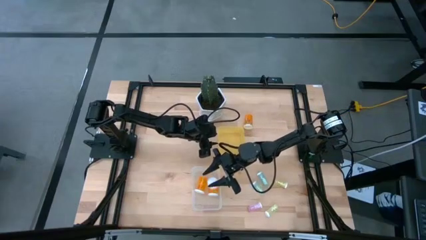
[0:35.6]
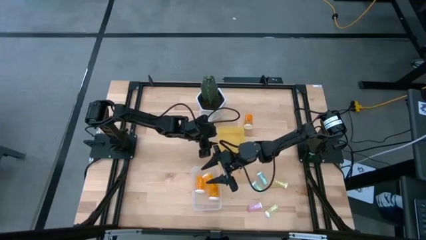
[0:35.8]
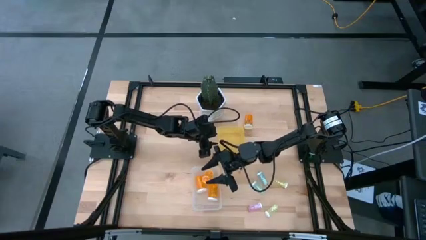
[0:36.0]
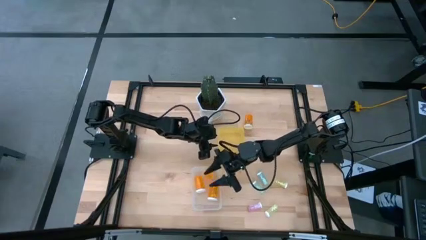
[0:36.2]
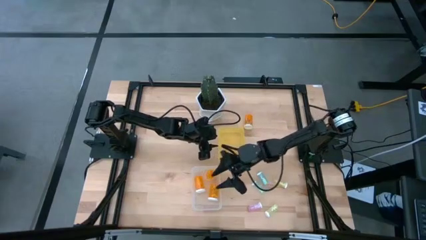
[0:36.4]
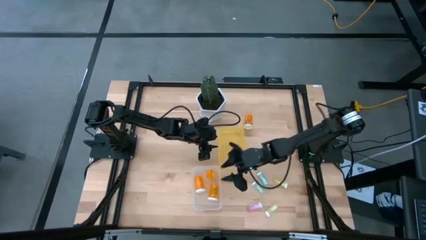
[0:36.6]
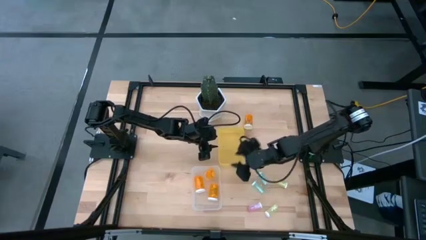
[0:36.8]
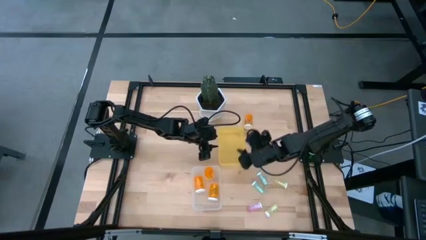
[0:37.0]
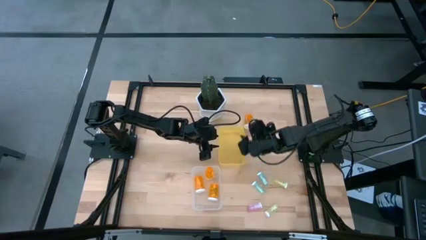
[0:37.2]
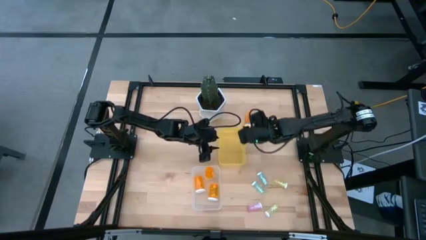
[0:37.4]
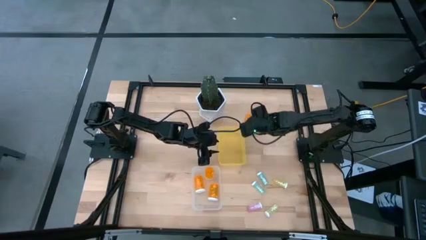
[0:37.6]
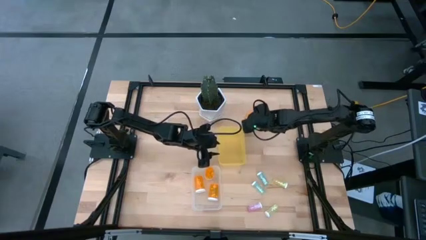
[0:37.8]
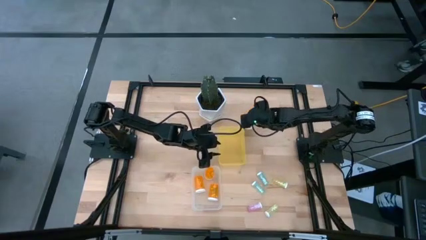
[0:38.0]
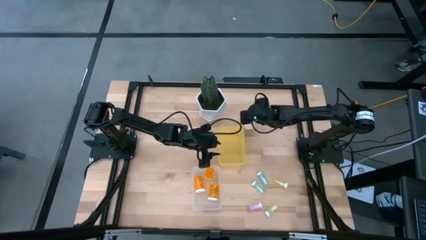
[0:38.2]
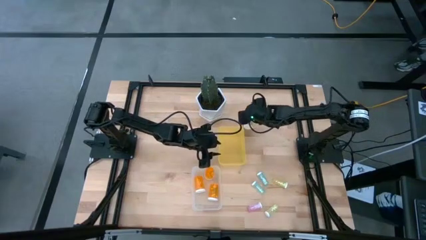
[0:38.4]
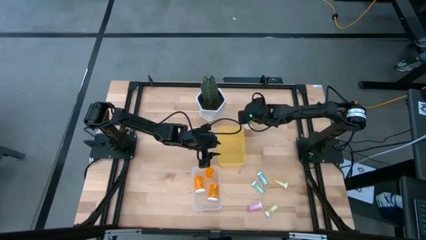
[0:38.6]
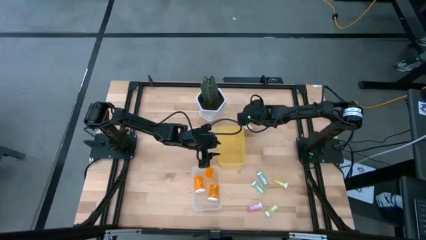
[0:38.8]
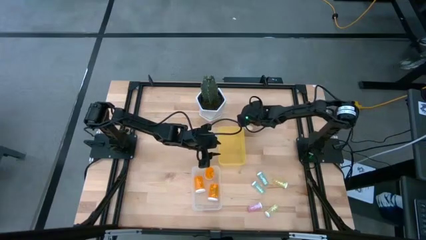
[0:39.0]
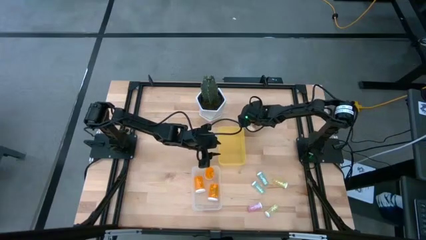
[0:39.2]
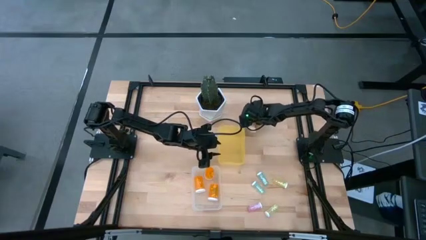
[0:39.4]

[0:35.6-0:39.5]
Task: Pick and place medicine bottles into bin by pill shape (circle, oval)
Put the large orange pill bottle into the transparent bin

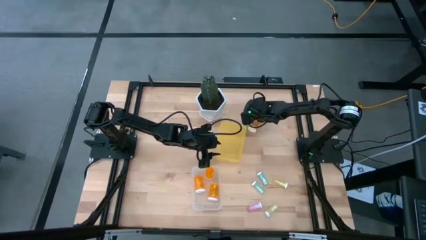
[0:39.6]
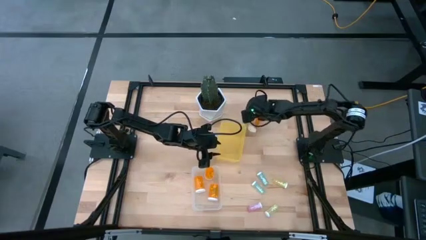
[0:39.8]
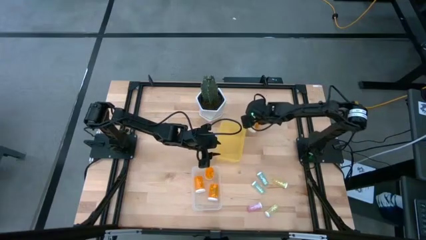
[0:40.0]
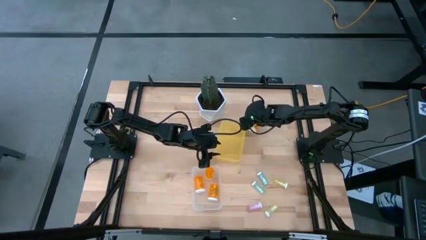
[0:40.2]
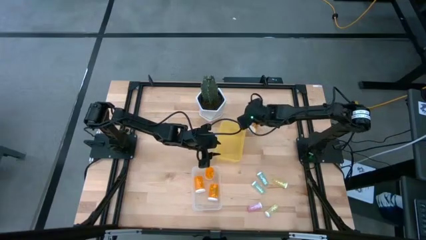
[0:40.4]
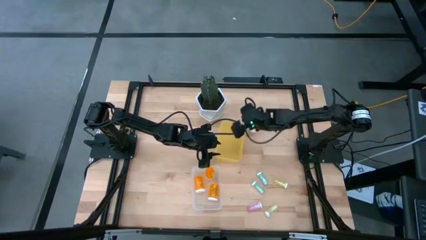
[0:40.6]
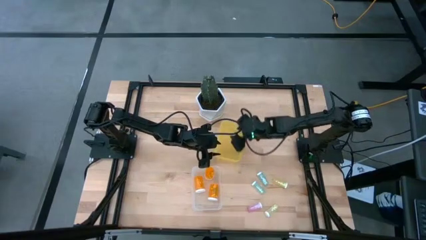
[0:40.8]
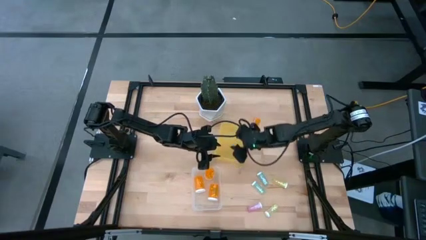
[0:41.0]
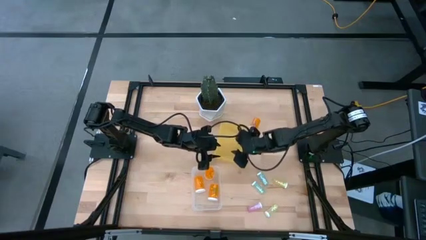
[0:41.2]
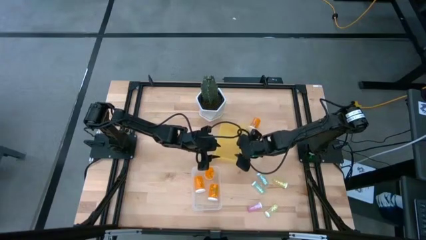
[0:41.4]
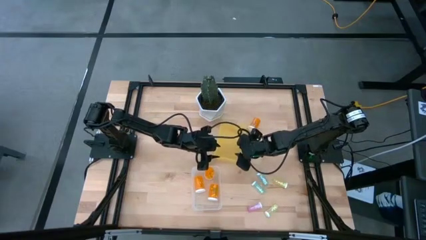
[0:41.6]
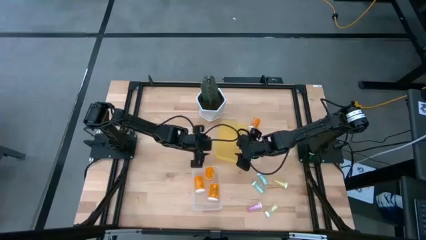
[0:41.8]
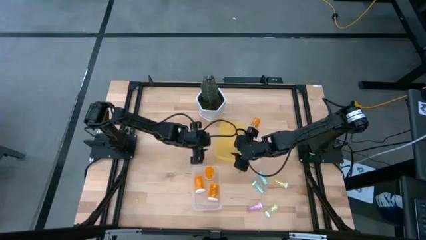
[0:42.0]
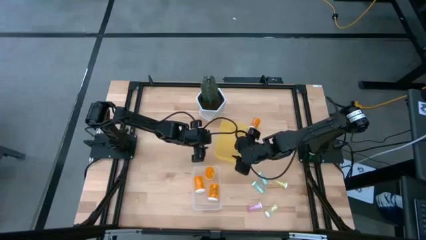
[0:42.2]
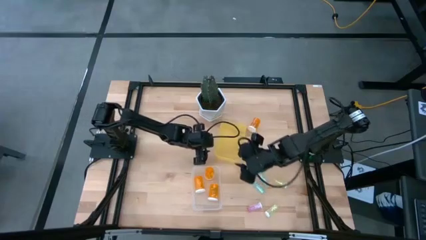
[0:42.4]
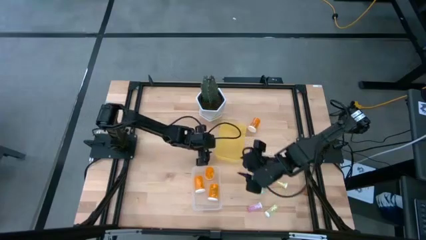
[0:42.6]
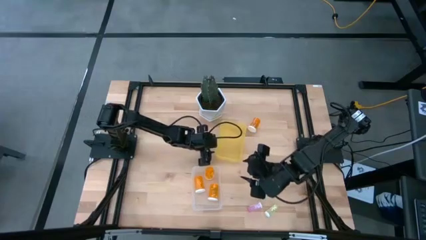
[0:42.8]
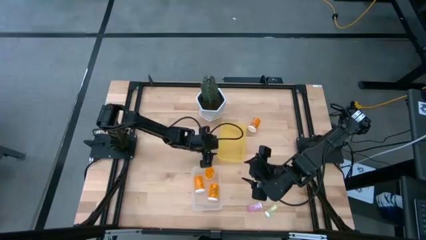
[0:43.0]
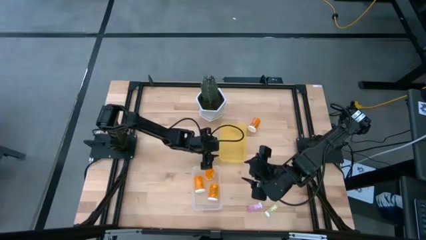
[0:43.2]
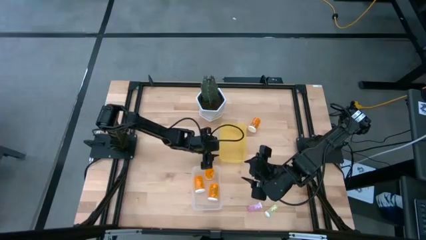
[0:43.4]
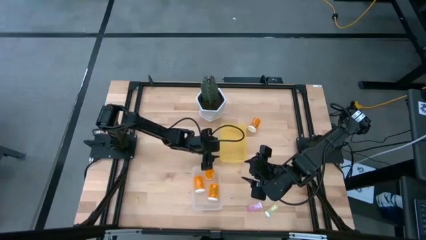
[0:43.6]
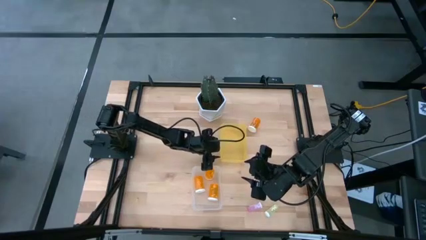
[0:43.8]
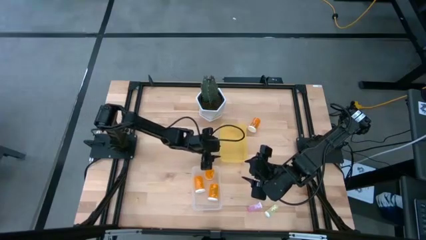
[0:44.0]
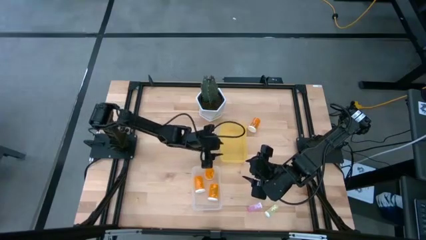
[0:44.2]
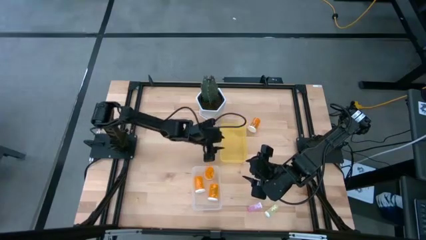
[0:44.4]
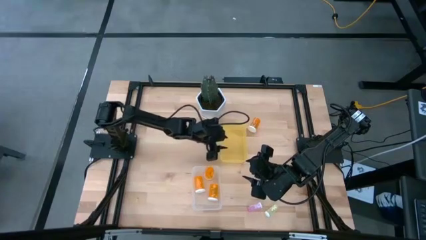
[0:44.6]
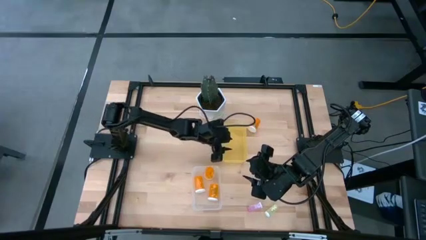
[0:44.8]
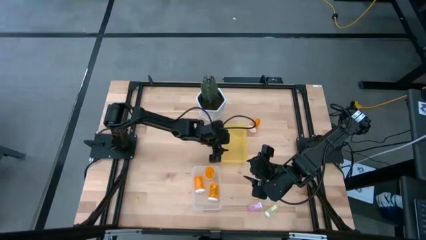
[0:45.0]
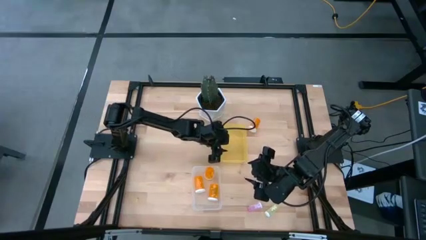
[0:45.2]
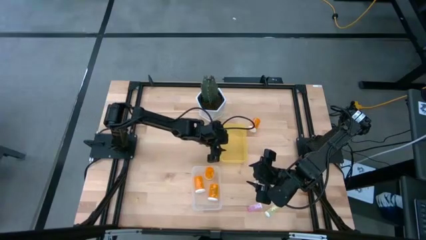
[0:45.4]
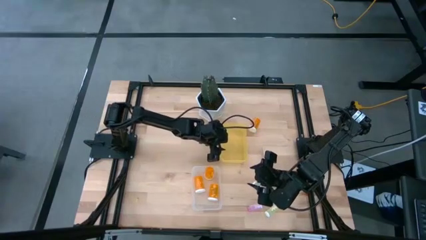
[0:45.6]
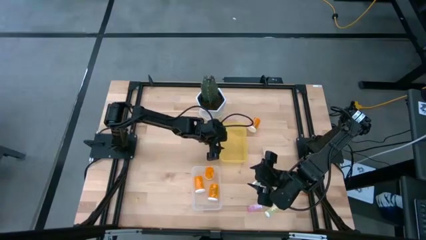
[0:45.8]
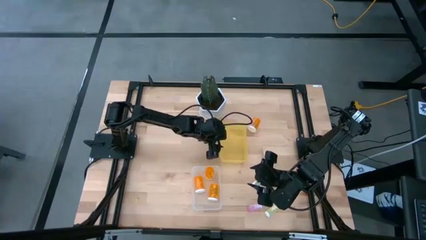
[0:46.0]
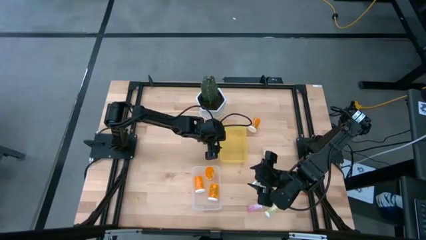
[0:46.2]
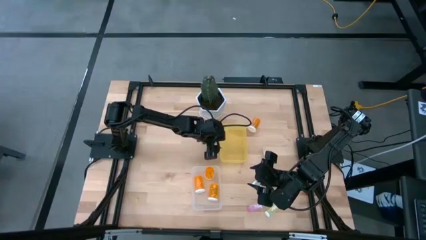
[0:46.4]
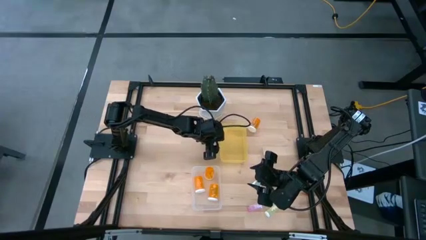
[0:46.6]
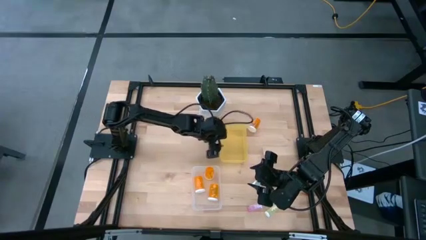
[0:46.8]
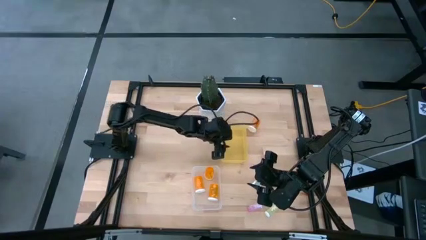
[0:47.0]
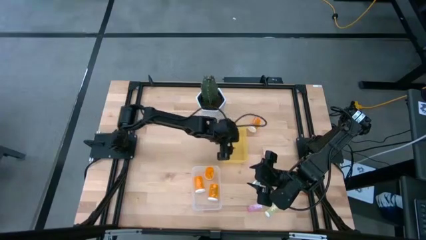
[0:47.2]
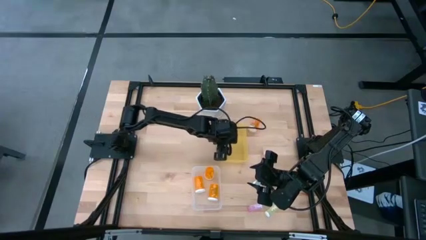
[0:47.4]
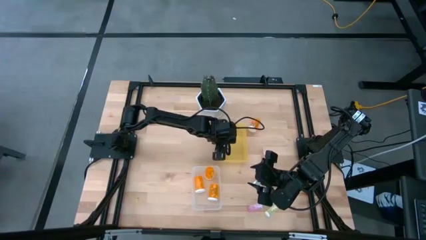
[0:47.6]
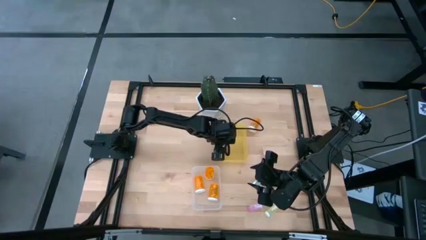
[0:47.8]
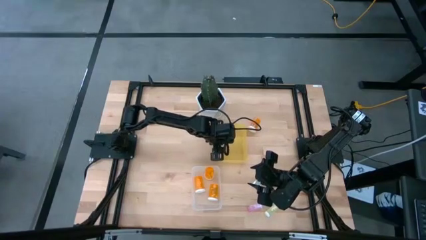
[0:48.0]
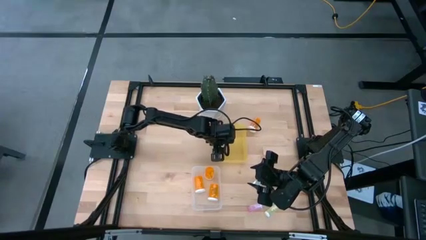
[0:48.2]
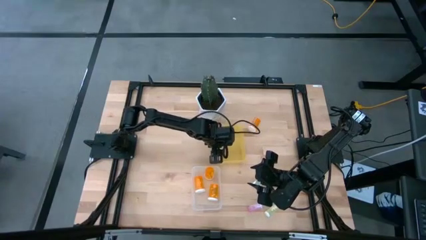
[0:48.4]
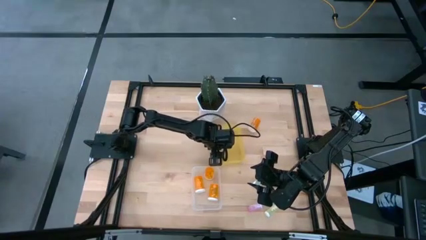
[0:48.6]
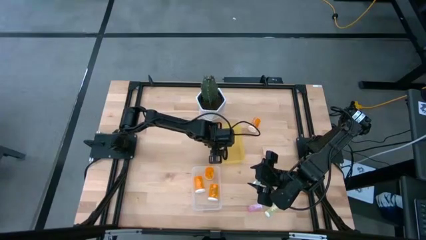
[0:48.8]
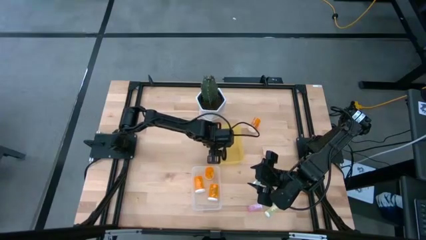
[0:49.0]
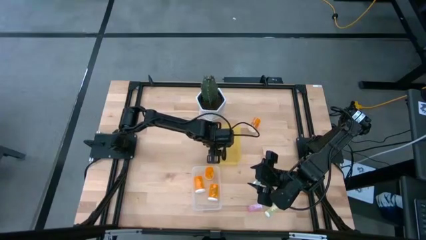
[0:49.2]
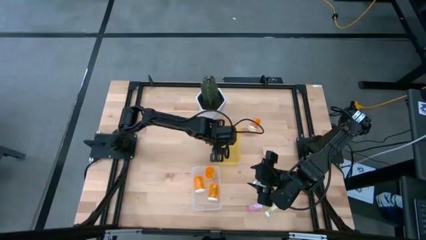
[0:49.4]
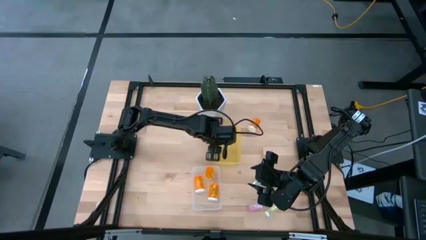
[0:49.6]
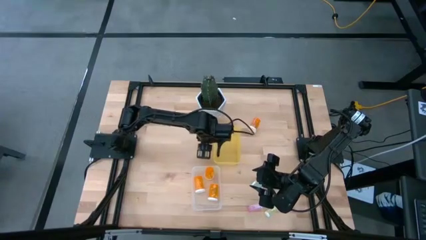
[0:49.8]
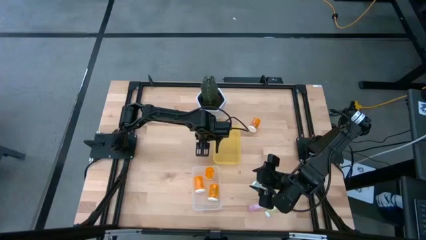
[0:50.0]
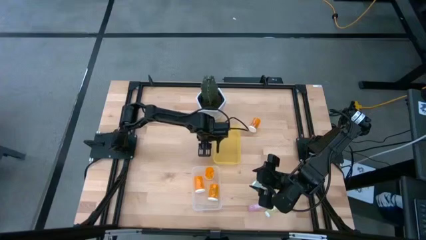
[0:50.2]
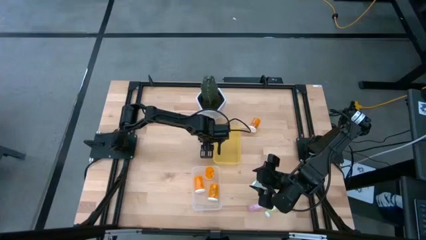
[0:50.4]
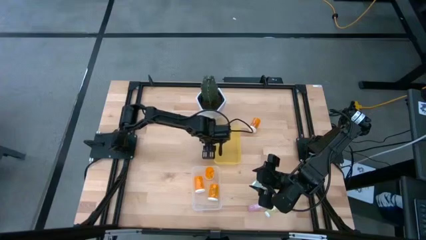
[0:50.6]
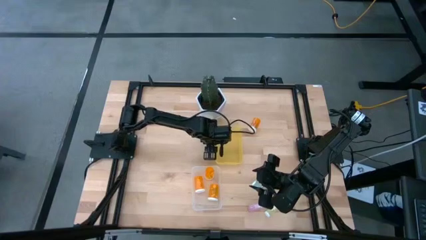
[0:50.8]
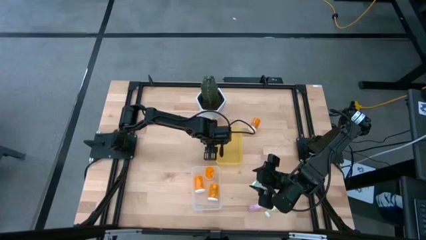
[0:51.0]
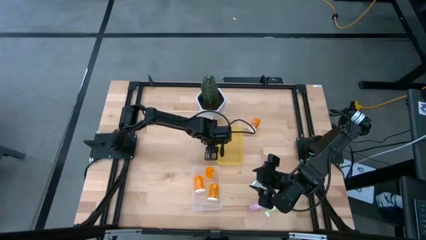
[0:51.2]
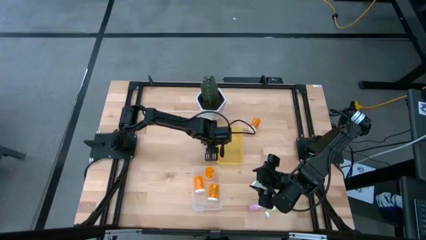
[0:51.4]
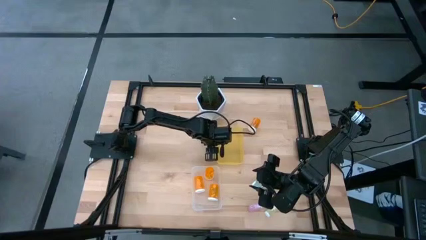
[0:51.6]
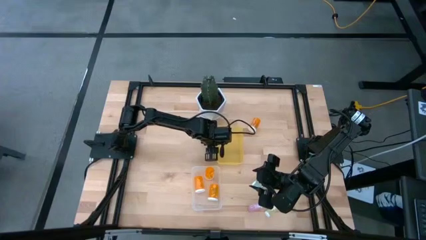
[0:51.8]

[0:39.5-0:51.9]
Adjust the yellow bin
